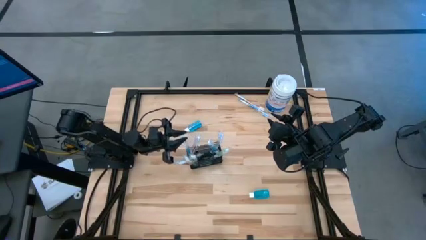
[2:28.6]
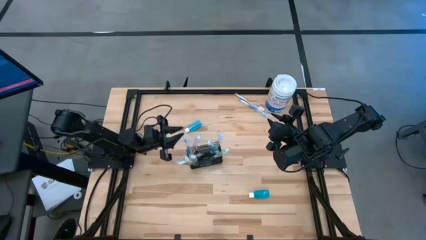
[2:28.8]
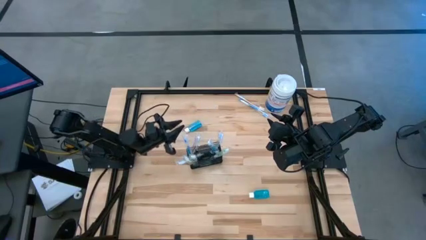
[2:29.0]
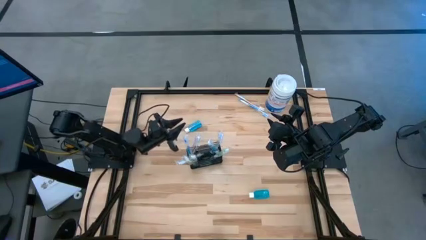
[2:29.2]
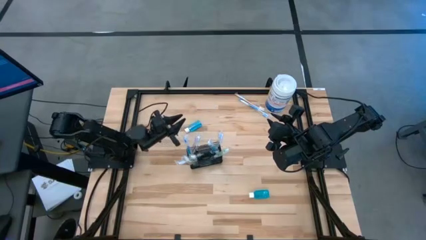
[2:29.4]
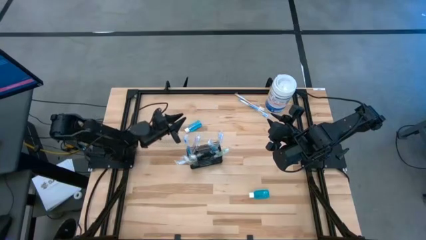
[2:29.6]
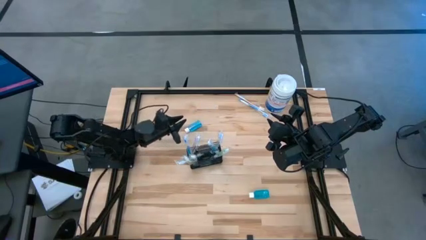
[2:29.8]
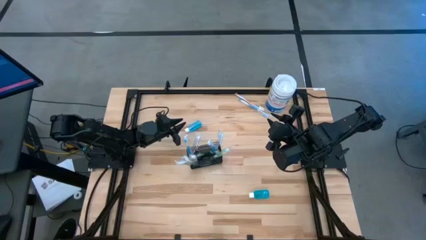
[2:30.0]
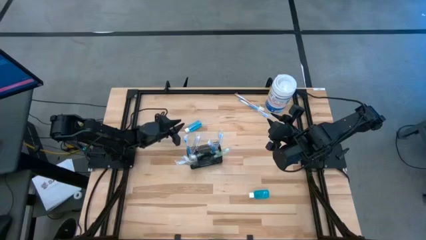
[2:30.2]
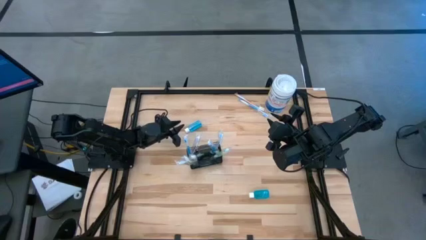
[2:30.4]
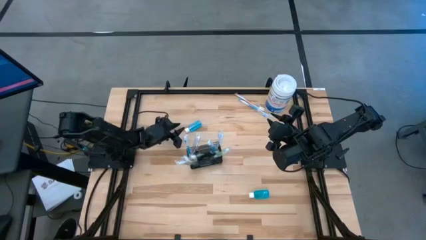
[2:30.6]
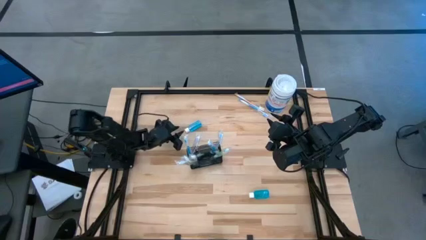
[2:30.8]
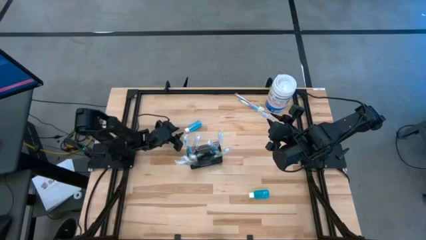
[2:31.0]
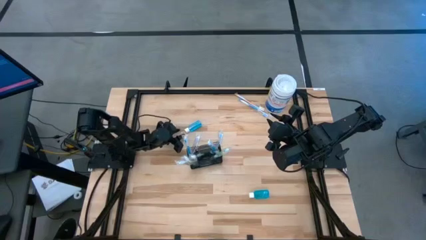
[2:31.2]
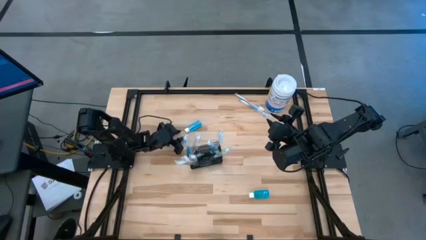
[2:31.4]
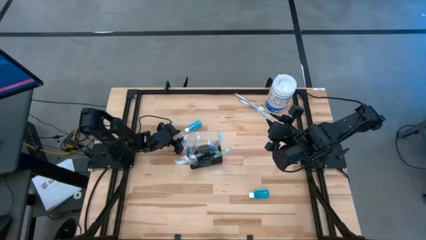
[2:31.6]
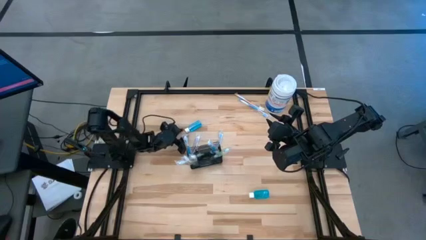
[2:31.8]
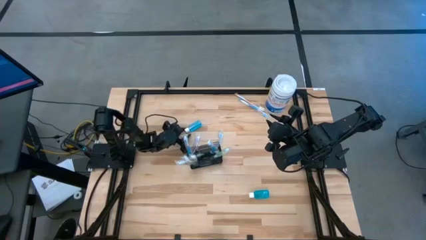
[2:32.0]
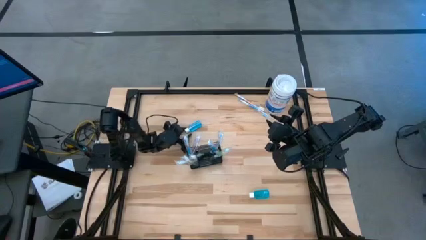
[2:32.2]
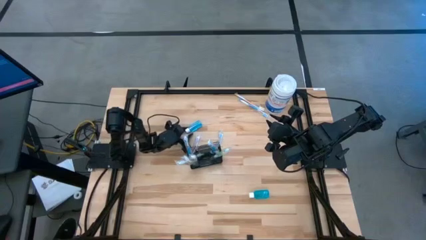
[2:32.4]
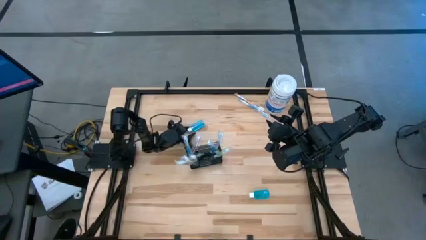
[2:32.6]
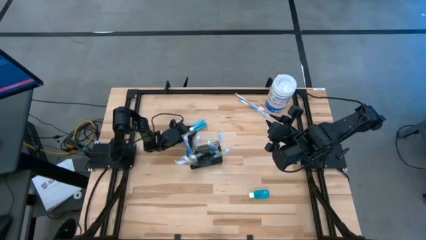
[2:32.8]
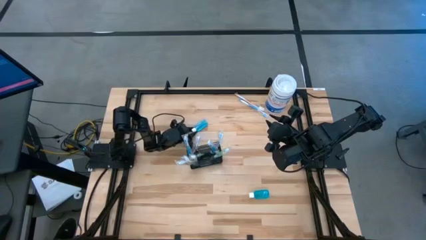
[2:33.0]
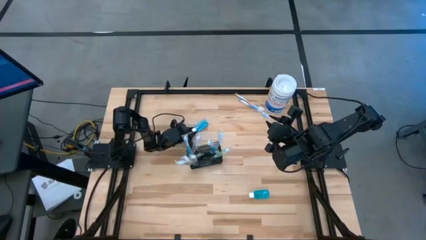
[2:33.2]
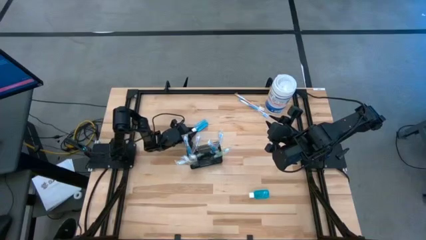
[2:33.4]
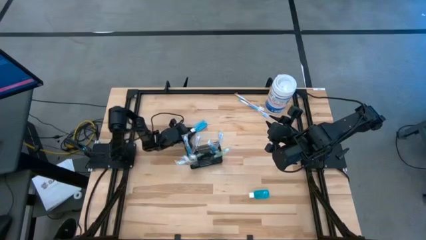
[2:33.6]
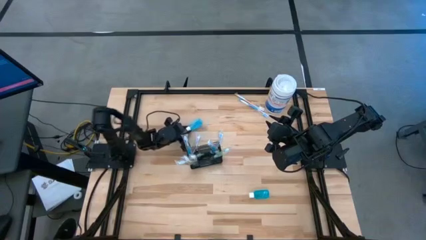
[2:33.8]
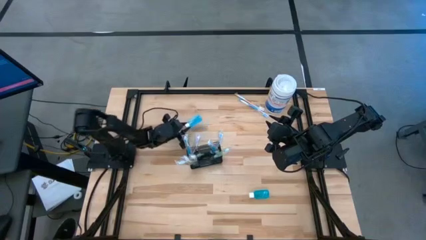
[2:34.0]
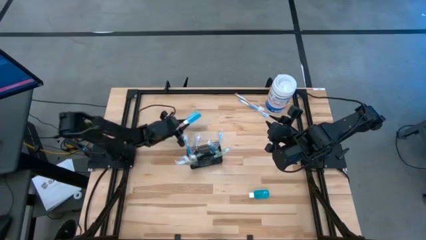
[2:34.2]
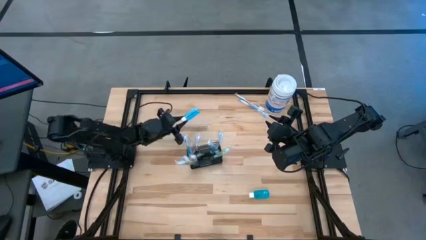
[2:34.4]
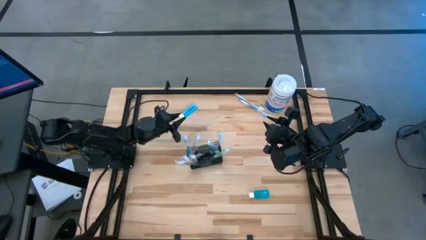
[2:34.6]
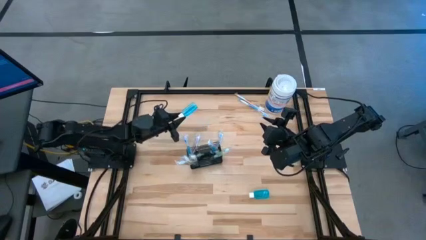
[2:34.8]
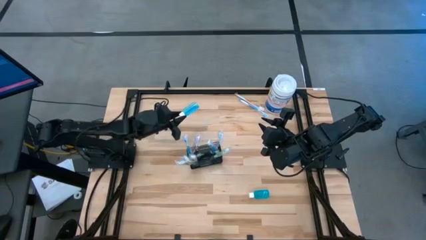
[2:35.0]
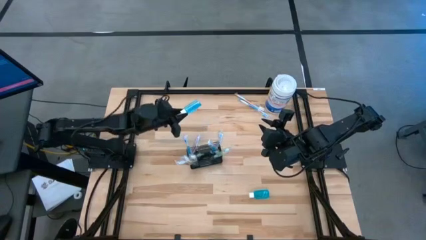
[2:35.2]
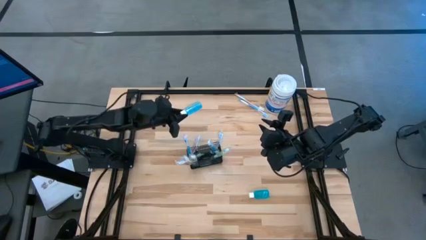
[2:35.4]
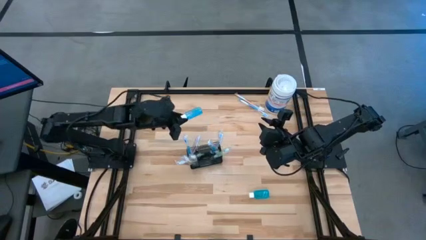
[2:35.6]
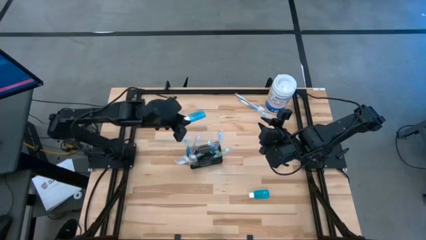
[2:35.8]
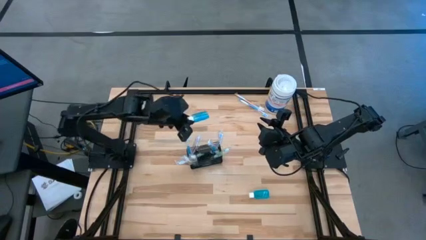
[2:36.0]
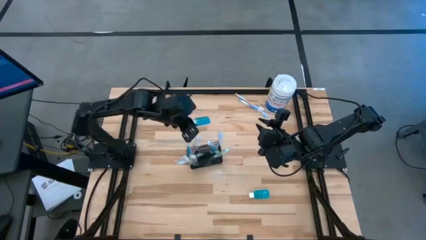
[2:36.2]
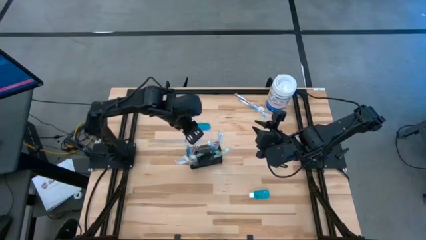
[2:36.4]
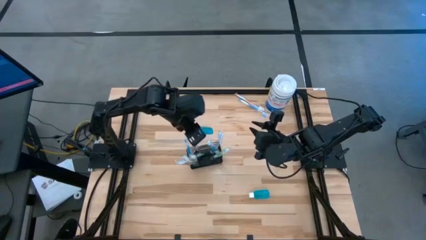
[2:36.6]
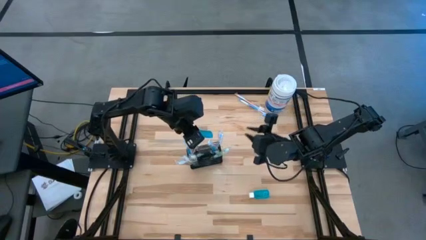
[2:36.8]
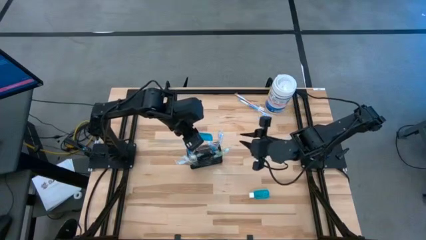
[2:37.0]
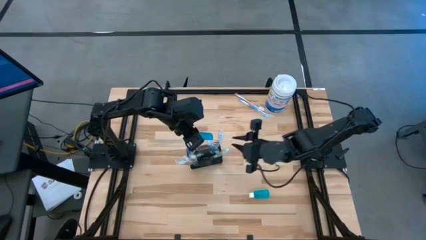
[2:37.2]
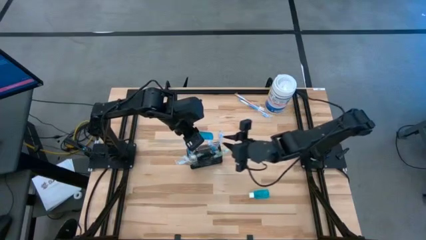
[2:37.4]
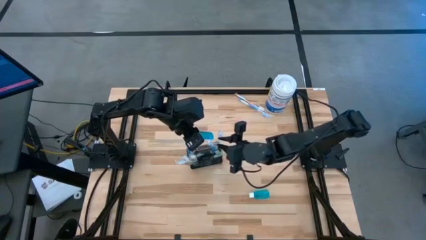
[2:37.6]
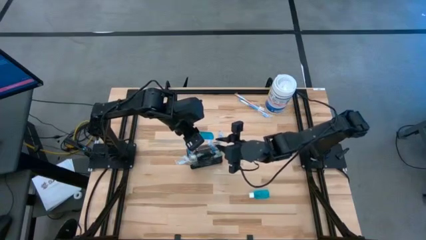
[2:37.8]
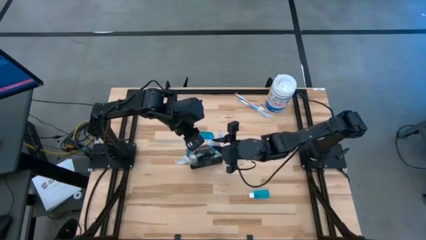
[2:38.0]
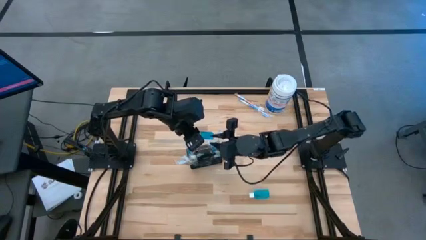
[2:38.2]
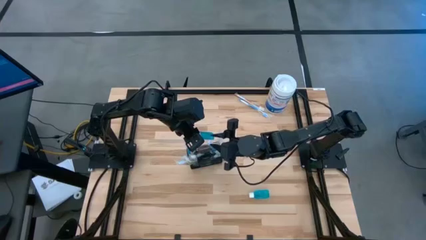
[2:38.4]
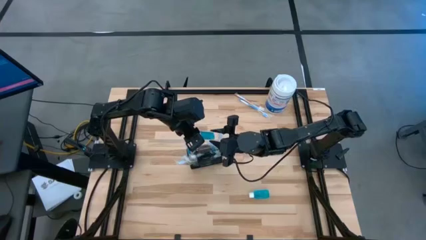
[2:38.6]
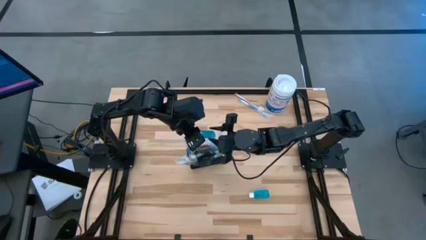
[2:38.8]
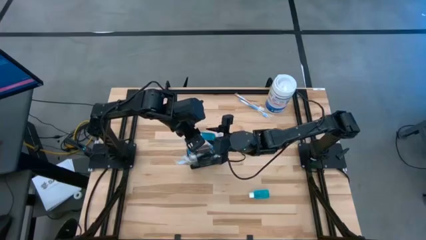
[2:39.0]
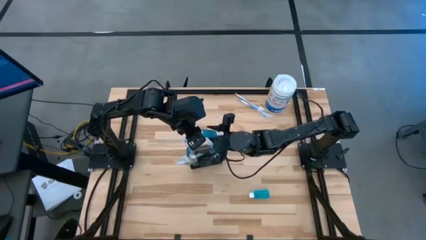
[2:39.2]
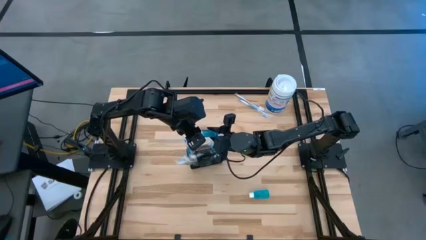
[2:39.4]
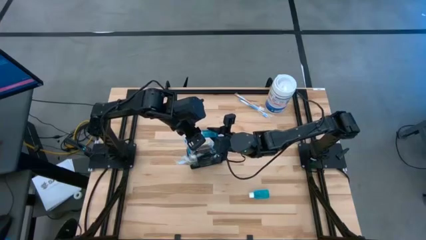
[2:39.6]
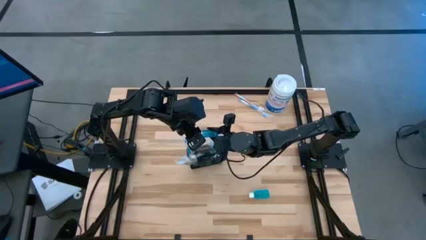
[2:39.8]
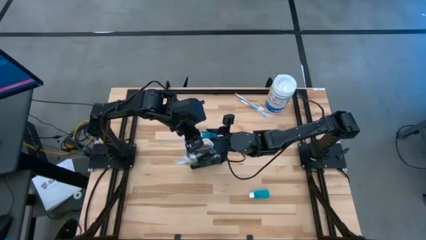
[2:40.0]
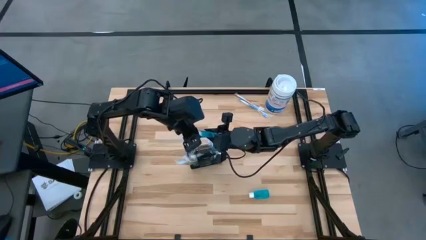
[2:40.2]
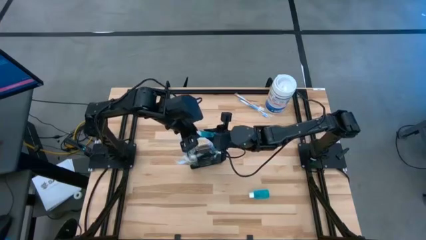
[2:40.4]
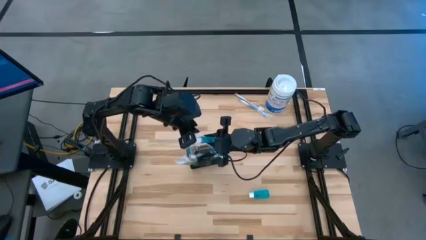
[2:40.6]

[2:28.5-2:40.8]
Task: Pick & Place toothbrushing station
Put the blue mouthwash into the wire organizer

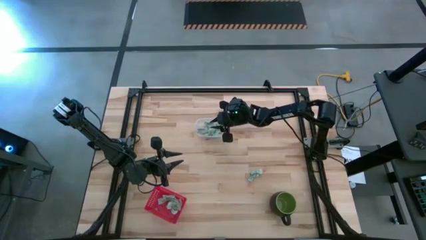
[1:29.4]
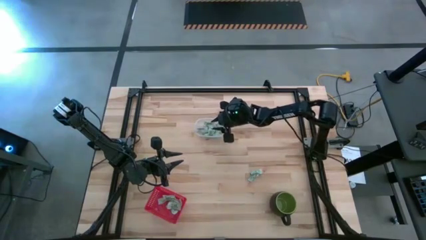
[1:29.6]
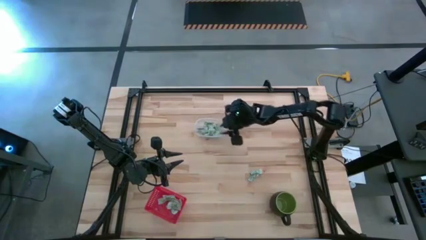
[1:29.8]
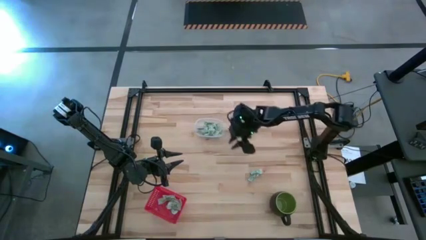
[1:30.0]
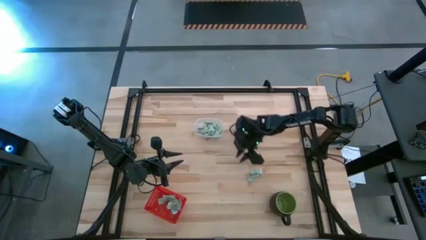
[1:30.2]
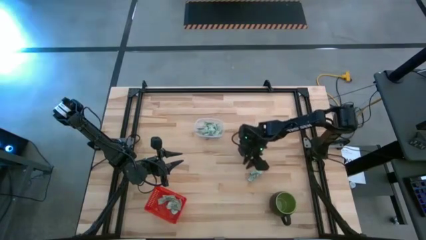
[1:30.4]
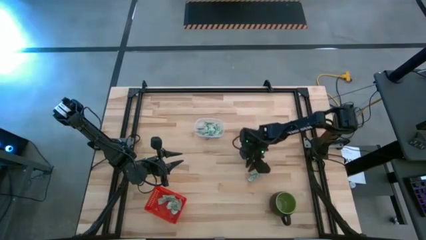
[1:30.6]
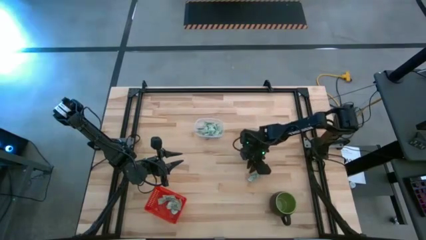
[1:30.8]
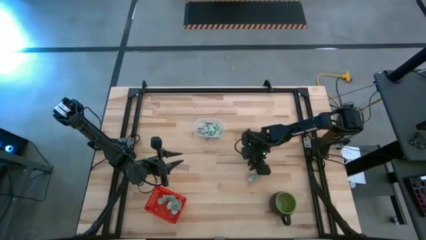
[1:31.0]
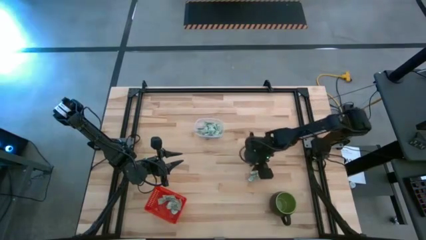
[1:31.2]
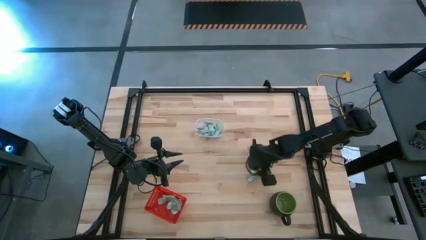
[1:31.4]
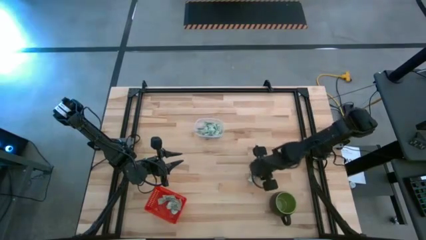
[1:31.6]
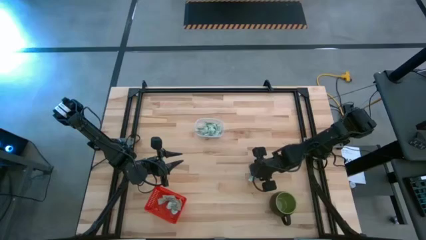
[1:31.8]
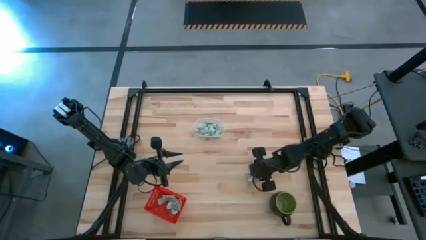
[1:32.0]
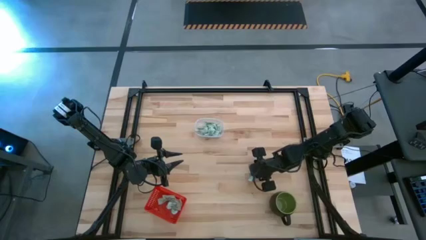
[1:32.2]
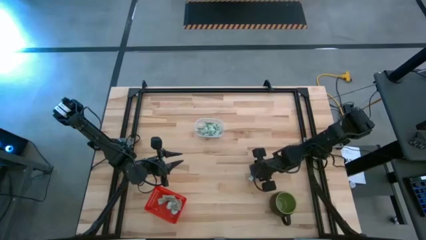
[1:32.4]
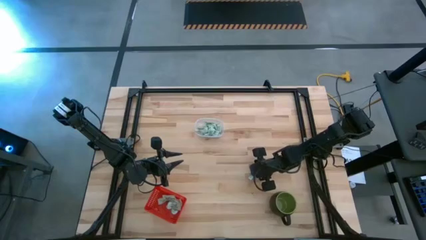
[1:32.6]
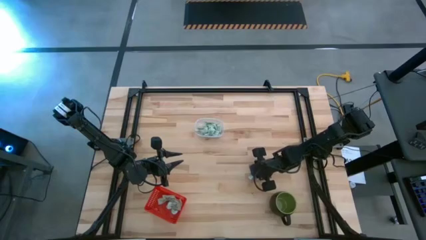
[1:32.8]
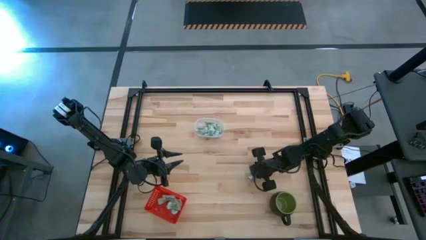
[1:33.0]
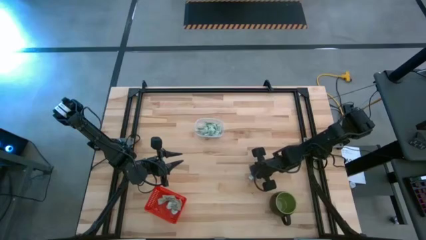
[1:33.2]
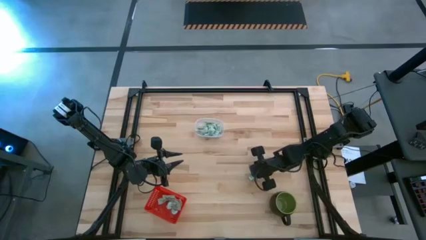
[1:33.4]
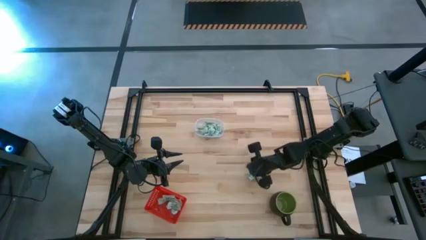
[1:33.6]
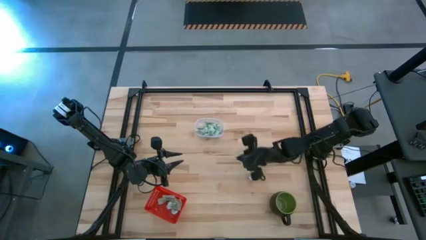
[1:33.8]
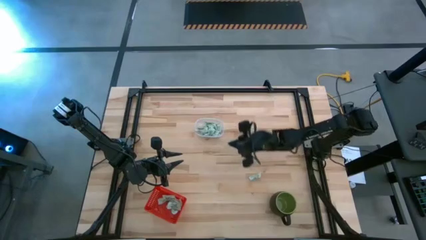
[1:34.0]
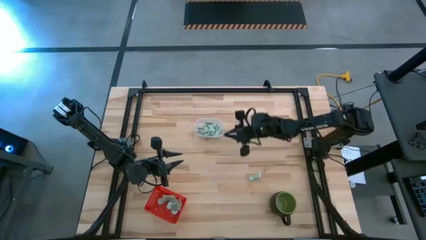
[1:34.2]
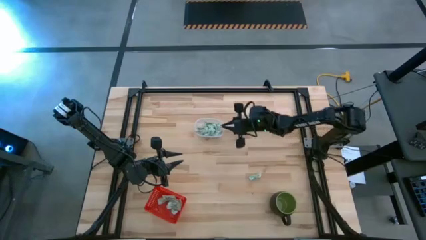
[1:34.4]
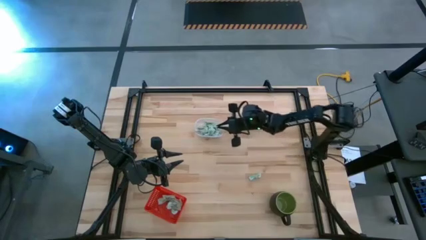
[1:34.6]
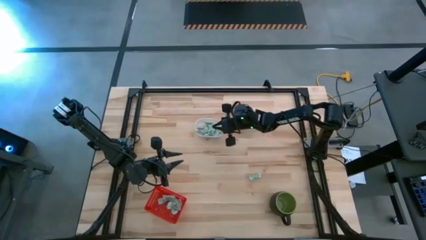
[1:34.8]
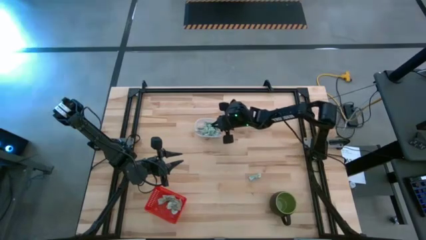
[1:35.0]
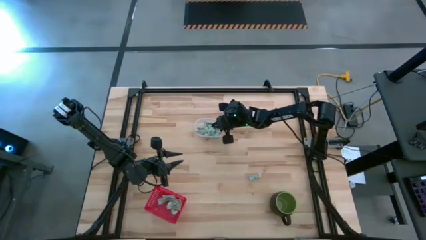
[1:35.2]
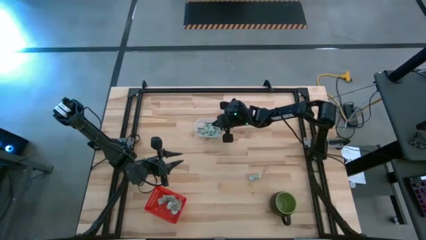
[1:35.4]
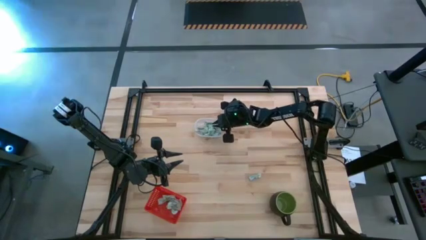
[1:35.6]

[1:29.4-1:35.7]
Task: Pick and place items into bin
Put the stevia packet into the transparent bin
